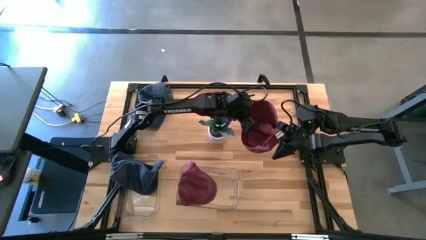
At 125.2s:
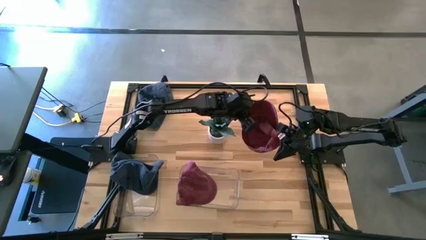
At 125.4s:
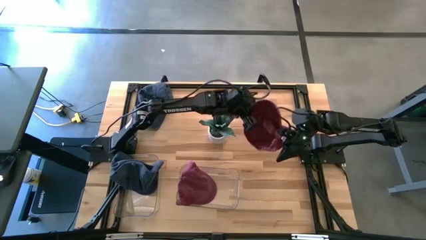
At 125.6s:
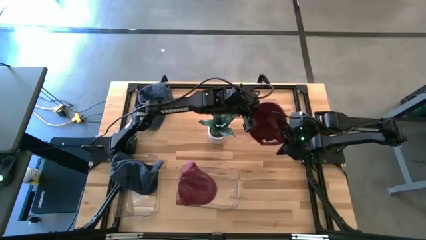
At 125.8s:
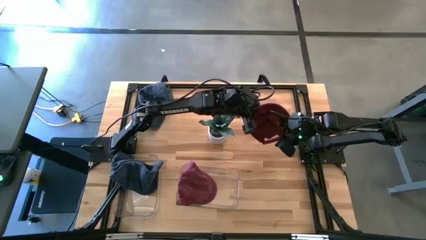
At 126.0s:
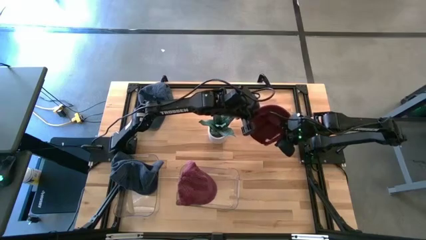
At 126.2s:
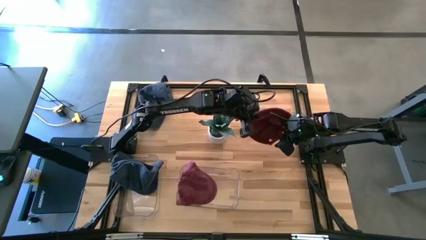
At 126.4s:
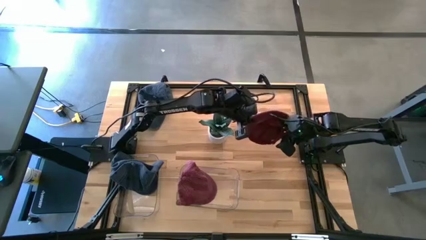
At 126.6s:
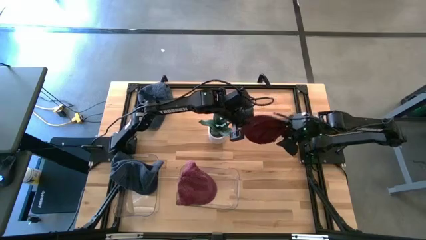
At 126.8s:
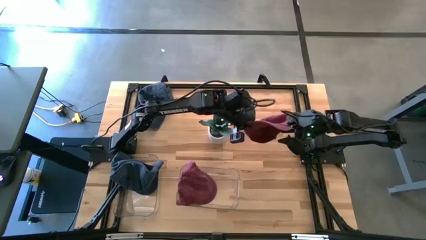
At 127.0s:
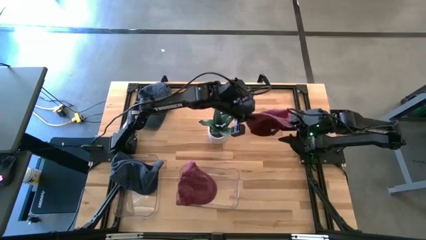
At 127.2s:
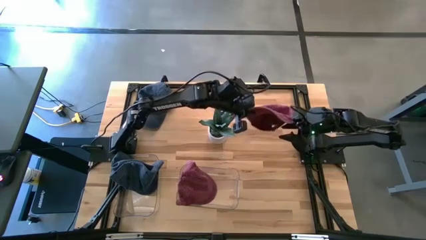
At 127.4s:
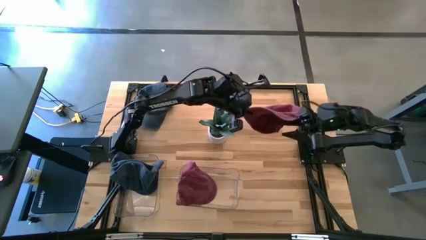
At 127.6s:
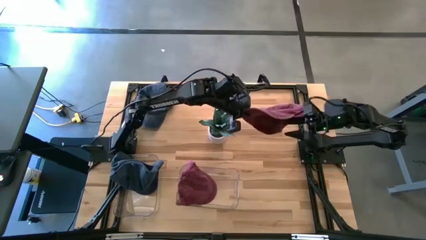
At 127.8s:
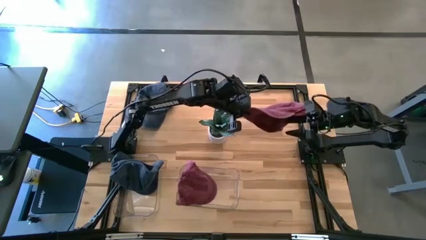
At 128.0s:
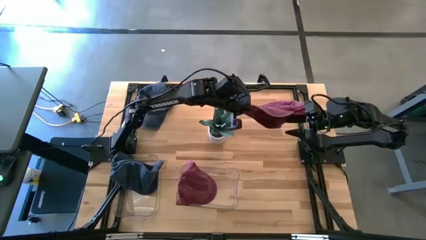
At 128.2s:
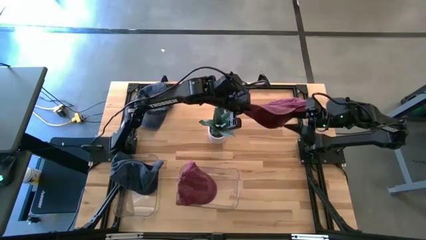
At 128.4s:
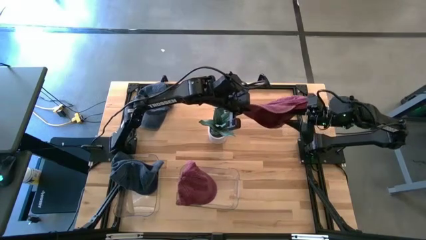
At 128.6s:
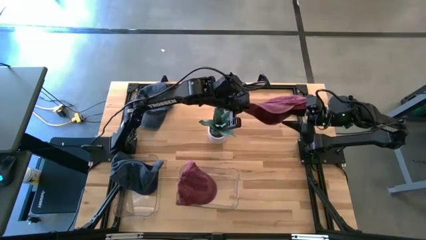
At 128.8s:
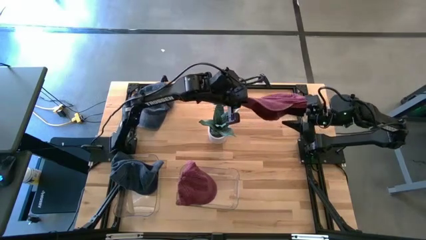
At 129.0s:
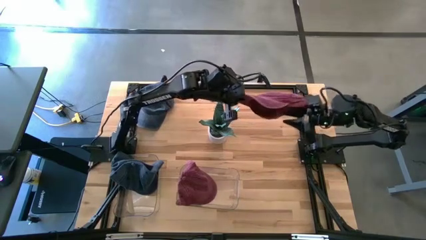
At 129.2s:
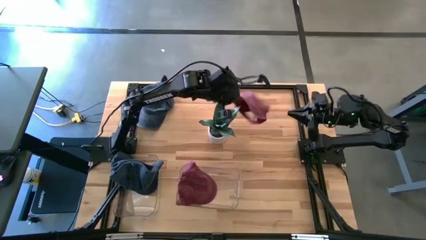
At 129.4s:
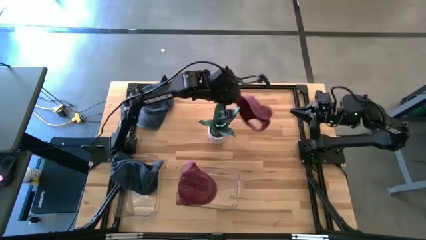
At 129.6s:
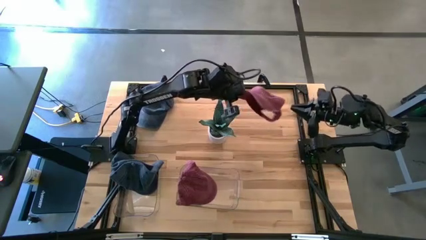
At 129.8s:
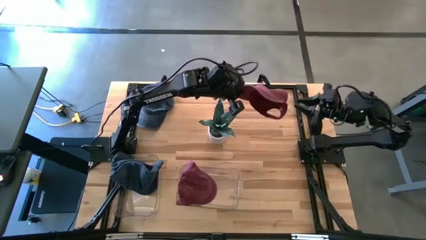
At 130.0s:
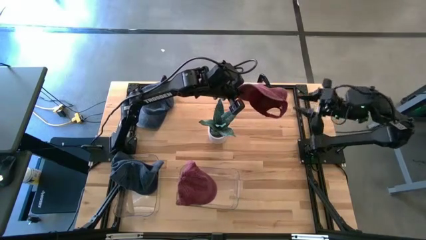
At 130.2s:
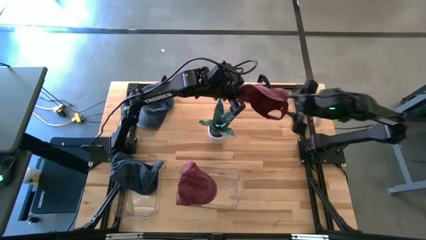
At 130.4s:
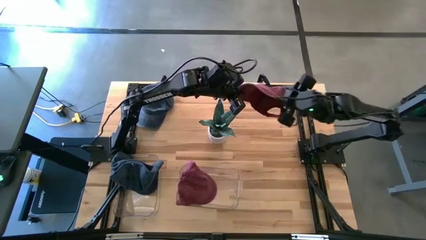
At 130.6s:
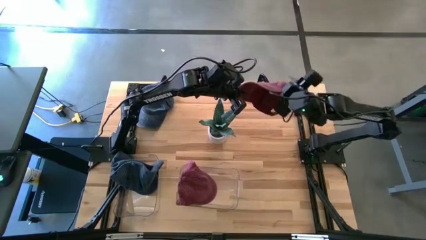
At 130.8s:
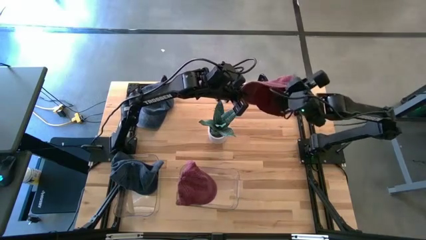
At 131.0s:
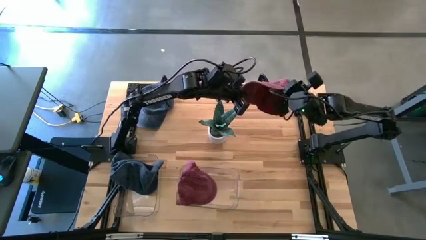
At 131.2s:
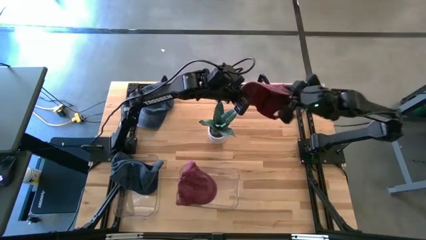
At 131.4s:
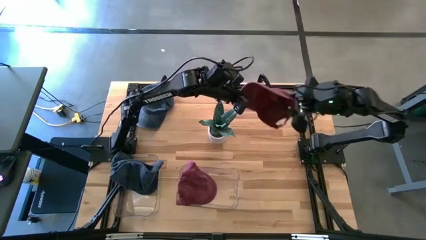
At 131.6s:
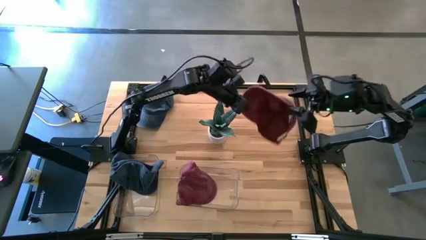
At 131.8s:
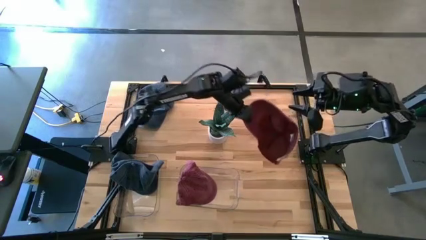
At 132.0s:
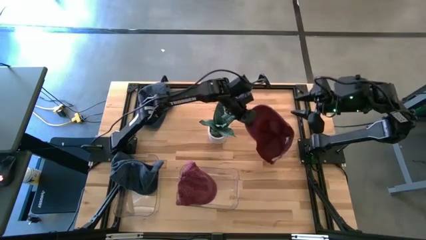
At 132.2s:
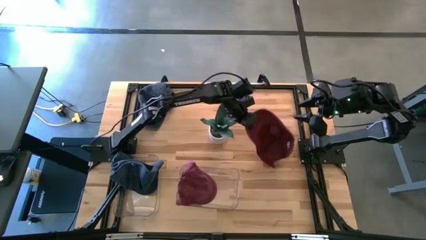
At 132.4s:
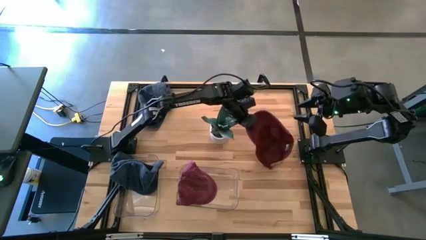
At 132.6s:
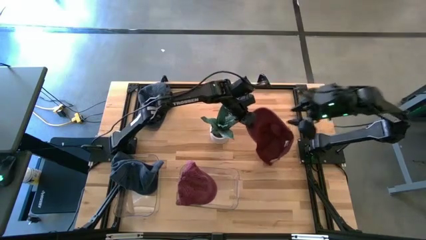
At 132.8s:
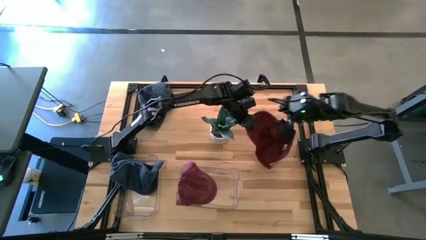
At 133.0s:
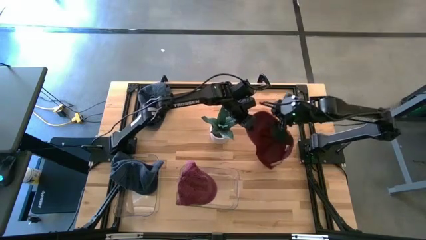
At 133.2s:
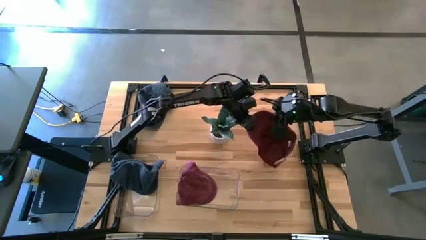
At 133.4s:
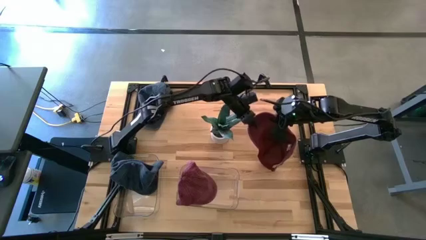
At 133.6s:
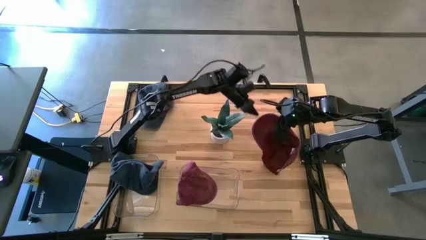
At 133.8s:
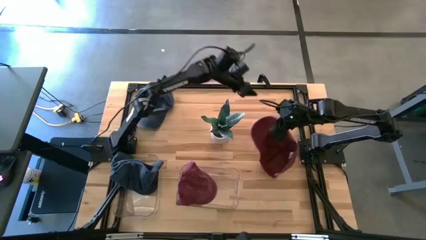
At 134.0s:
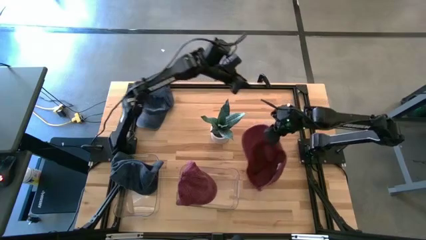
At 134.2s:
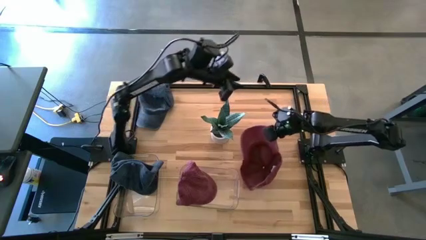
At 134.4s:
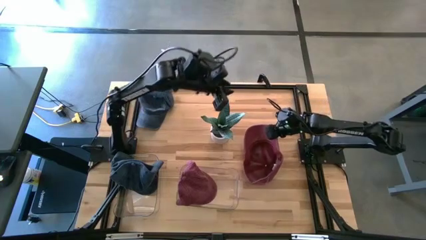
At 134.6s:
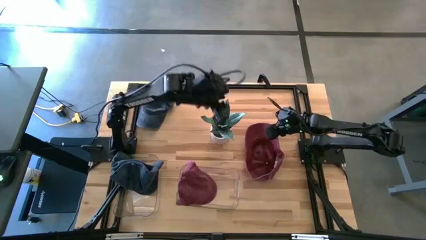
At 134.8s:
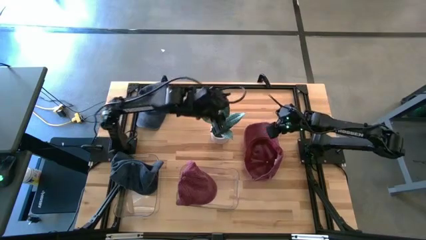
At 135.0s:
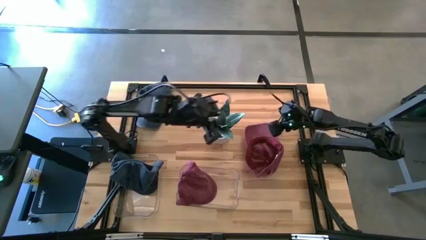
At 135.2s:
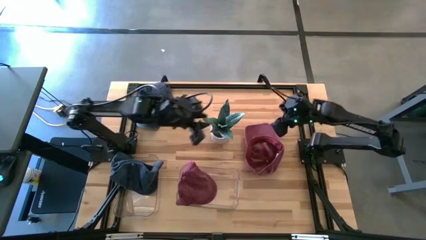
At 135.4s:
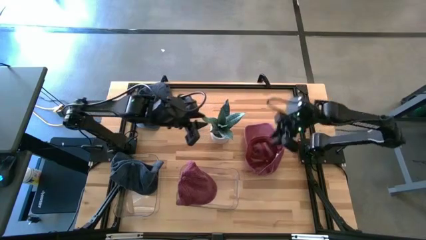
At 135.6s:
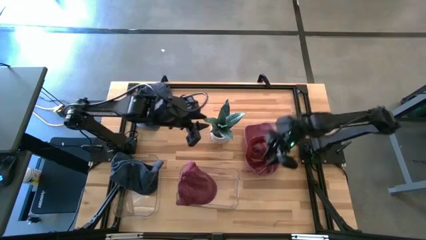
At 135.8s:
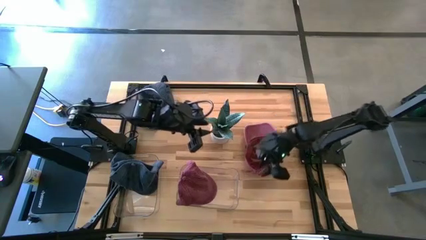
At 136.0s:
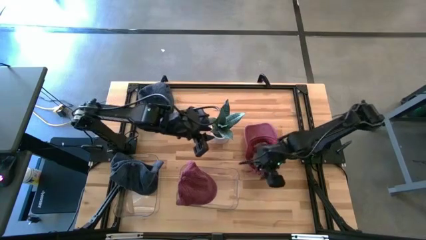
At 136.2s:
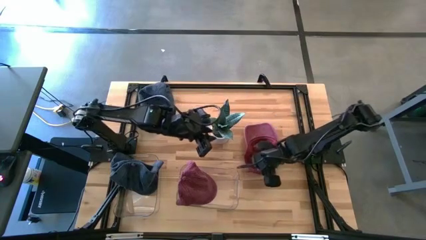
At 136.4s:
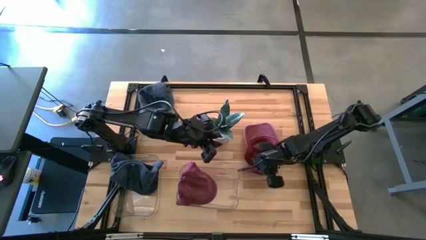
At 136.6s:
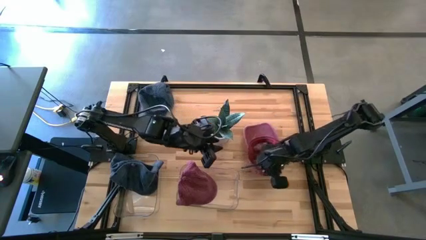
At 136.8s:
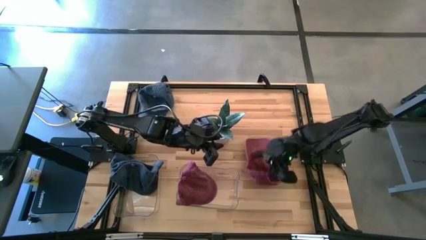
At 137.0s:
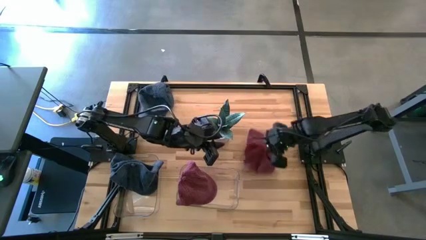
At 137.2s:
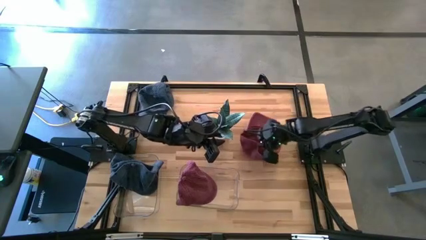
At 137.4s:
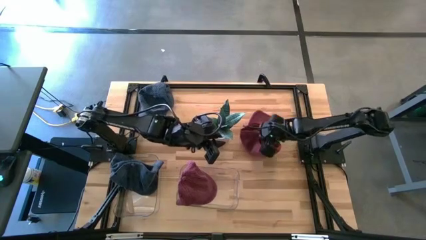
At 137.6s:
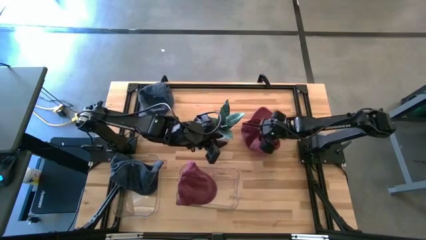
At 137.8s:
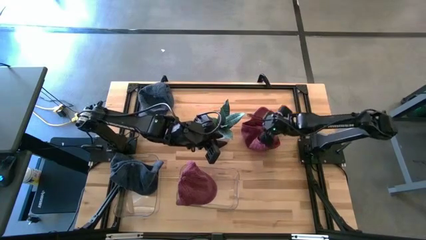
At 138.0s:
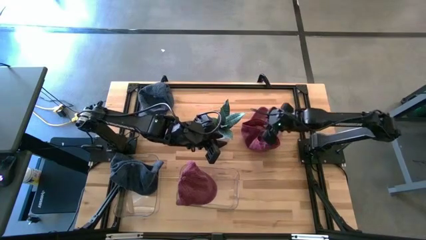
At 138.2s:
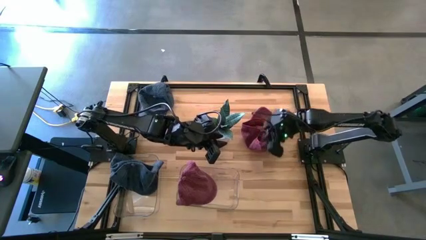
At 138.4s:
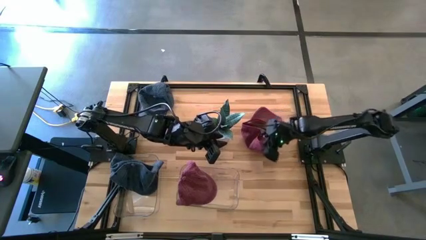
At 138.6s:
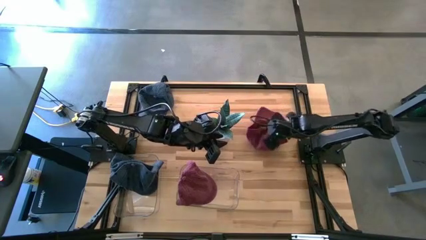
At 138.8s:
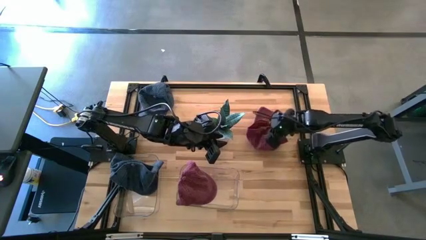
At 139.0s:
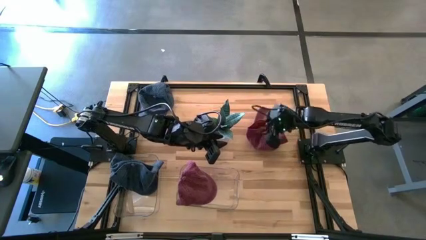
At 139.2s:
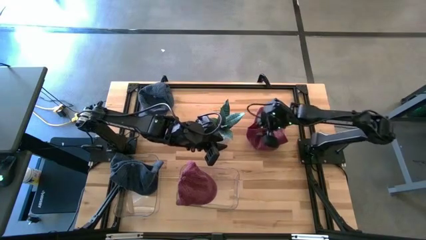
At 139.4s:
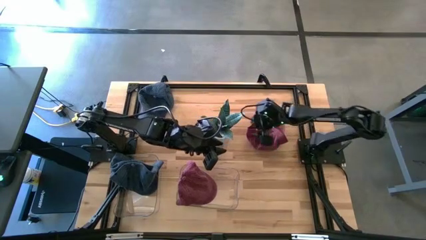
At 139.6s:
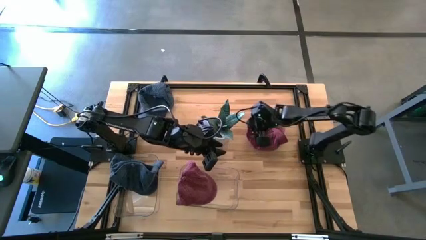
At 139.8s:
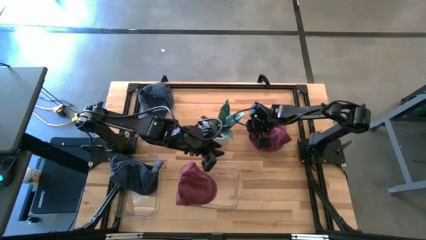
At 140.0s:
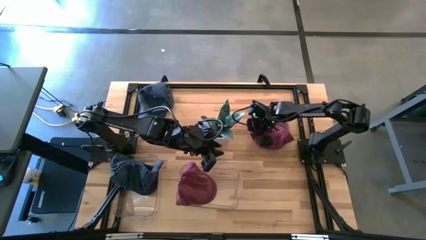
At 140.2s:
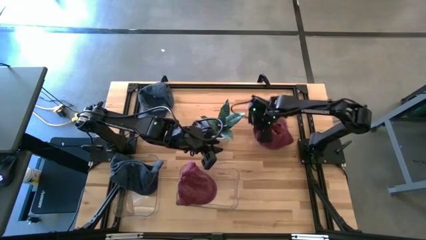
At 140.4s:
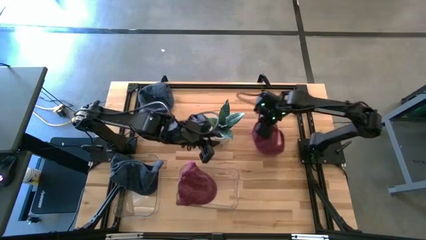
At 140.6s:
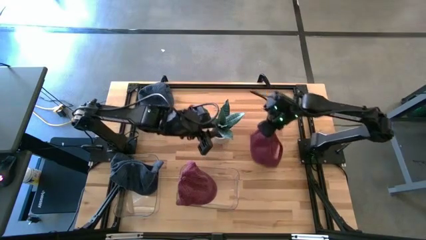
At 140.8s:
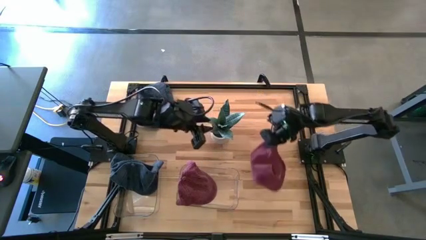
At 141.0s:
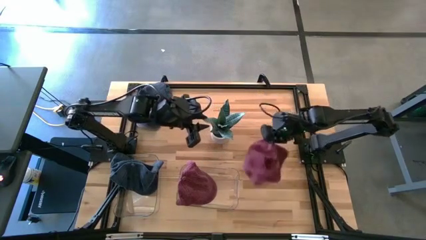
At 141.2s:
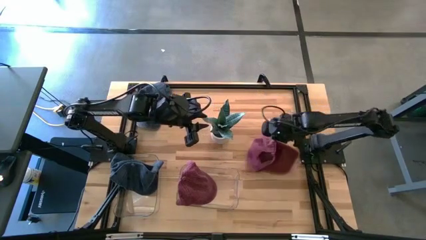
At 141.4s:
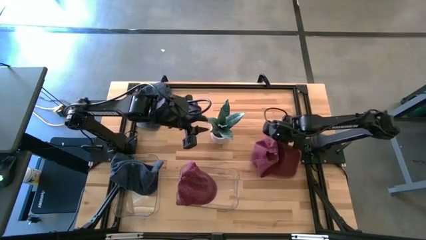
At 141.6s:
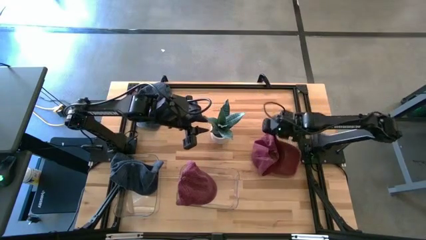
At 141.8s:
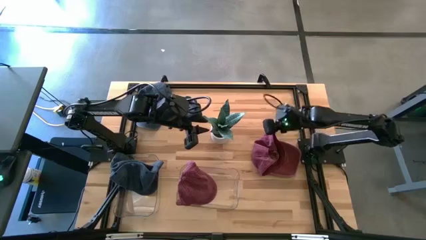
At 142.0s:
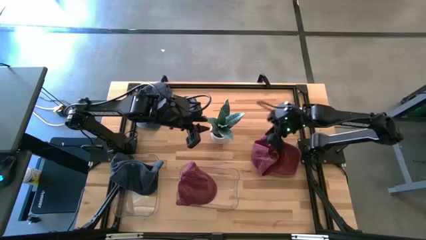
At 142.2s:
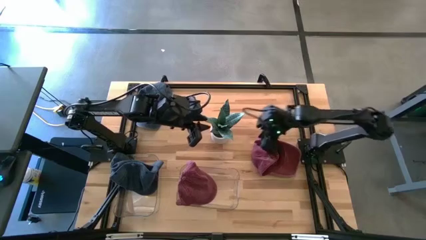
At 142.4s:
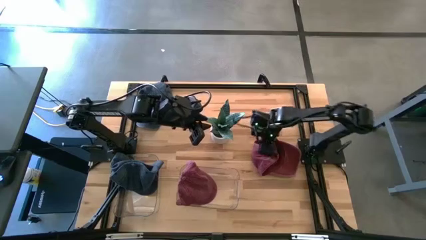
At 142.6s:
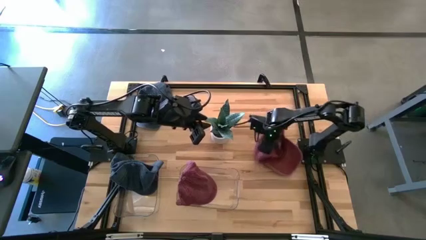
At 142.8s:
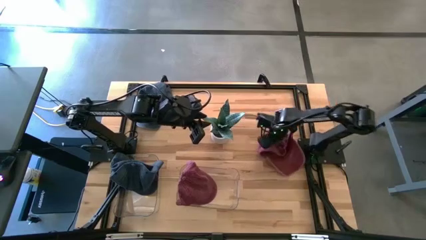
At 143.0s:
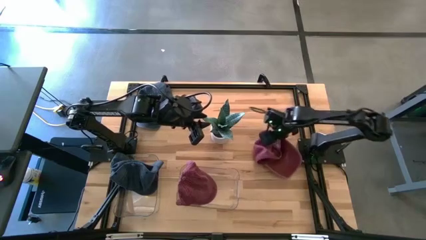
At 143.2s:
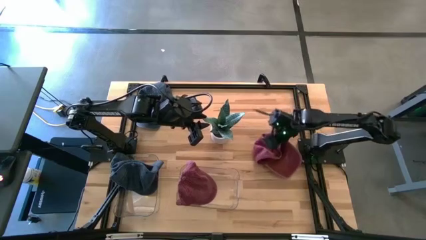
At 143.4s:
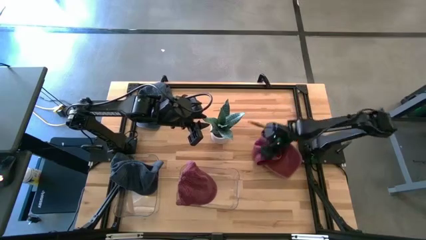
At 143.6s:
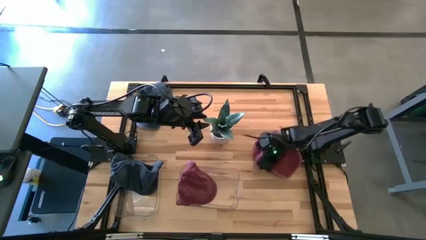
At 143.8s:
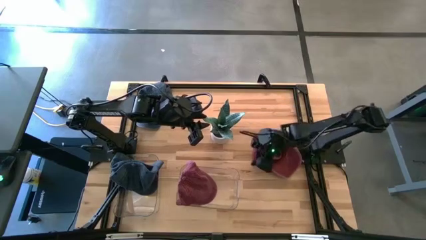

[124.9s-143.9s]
Task: Pick & Place hat
Put the red cap into the right transparent bin
